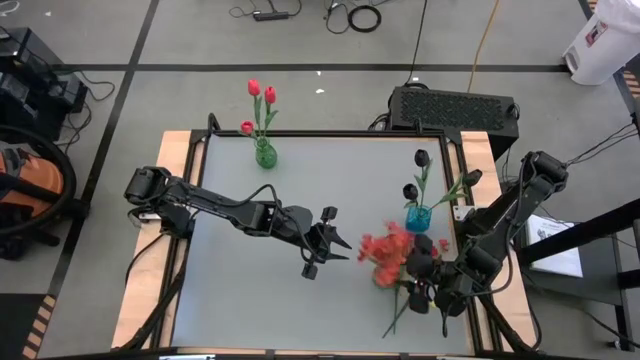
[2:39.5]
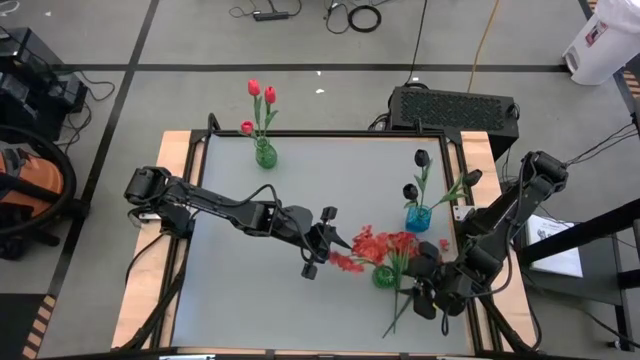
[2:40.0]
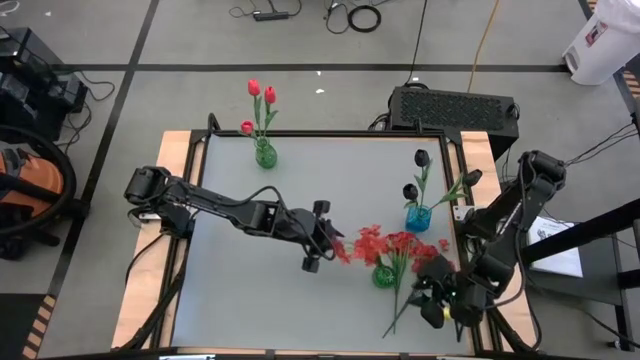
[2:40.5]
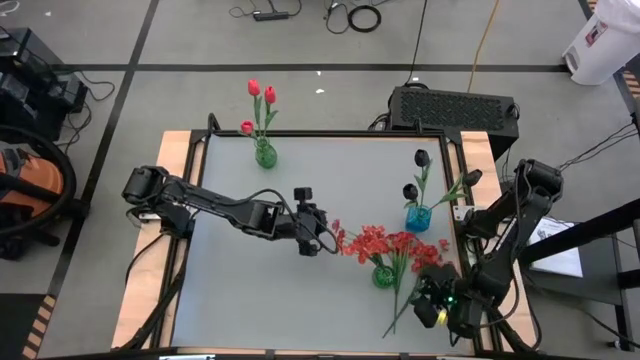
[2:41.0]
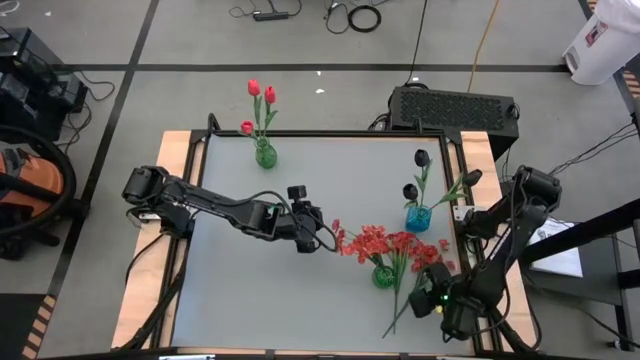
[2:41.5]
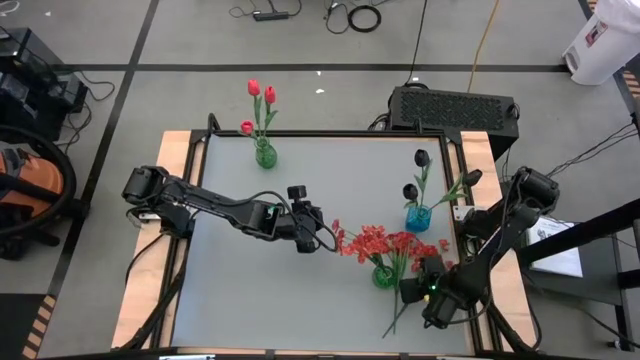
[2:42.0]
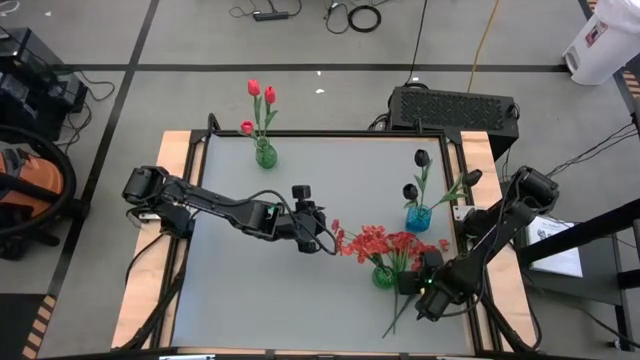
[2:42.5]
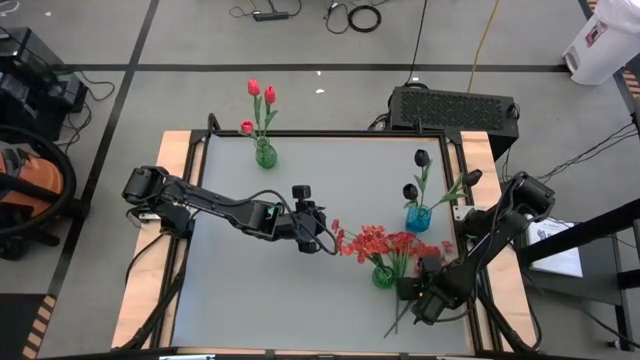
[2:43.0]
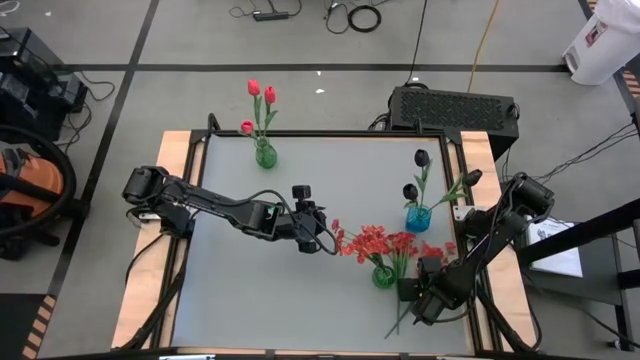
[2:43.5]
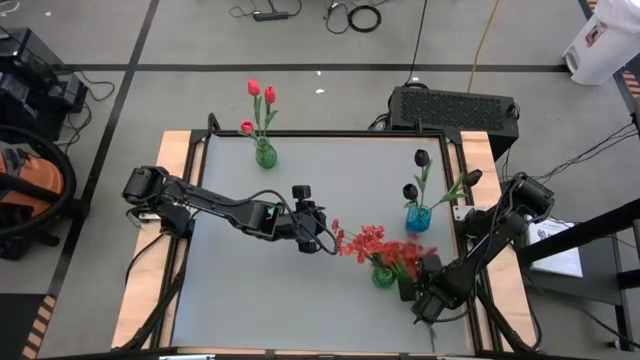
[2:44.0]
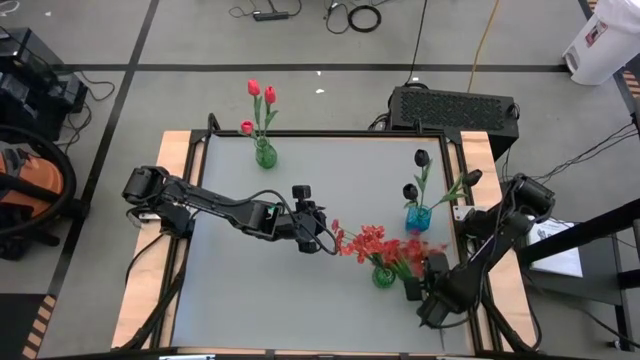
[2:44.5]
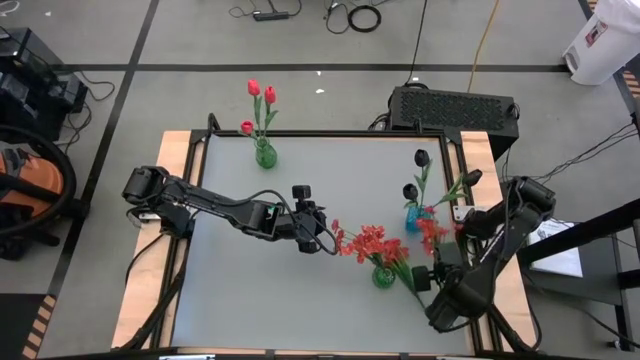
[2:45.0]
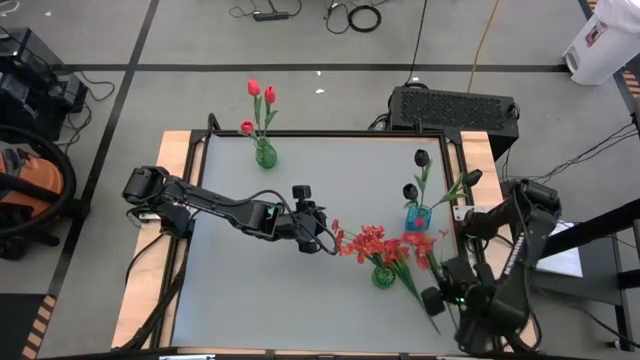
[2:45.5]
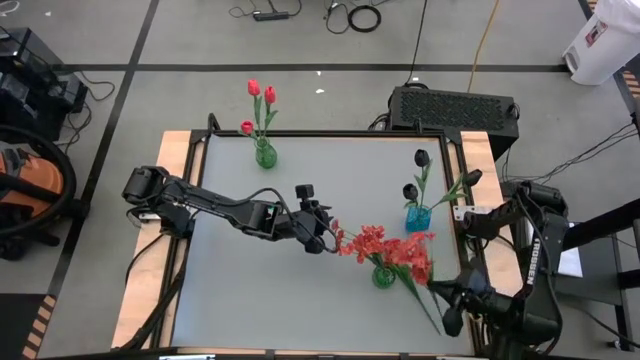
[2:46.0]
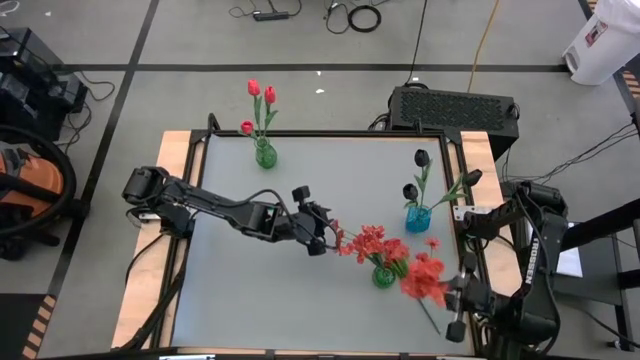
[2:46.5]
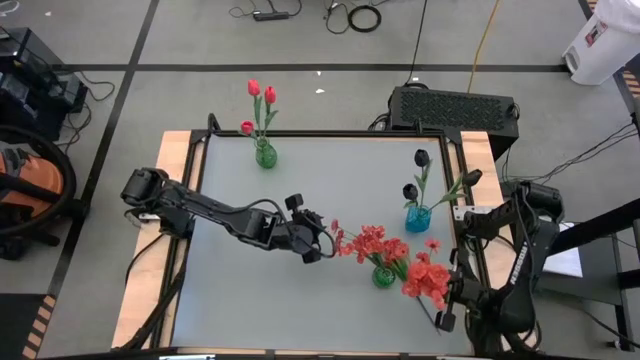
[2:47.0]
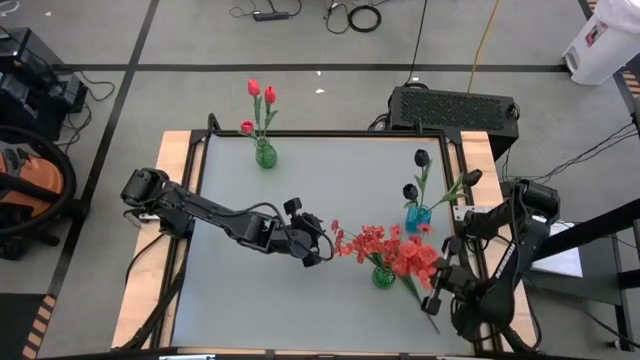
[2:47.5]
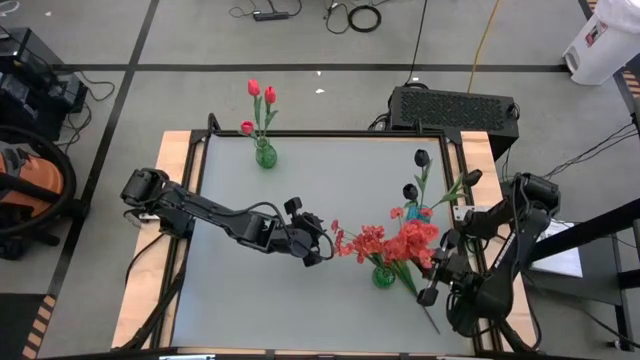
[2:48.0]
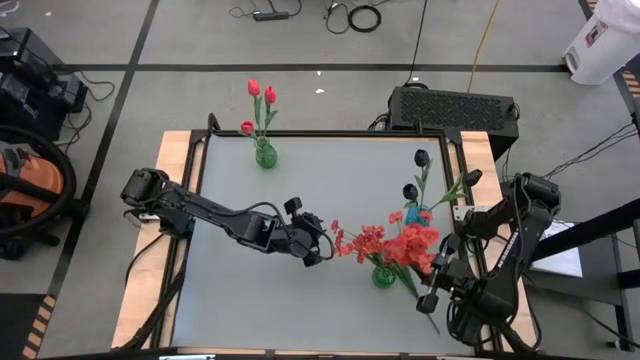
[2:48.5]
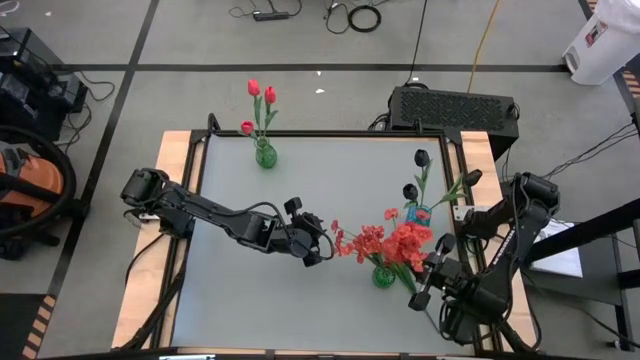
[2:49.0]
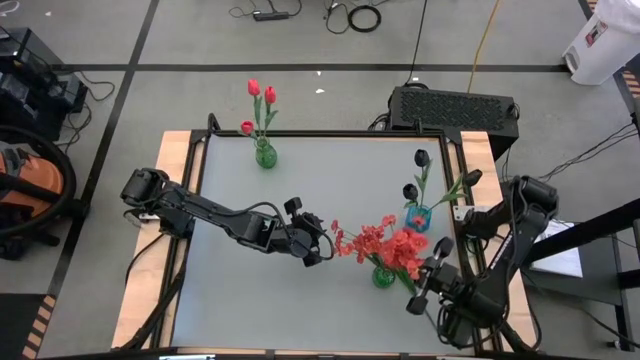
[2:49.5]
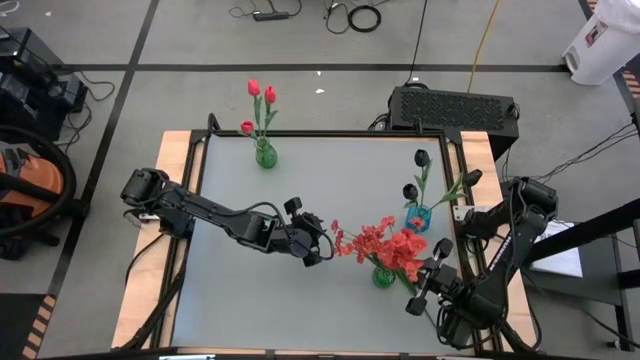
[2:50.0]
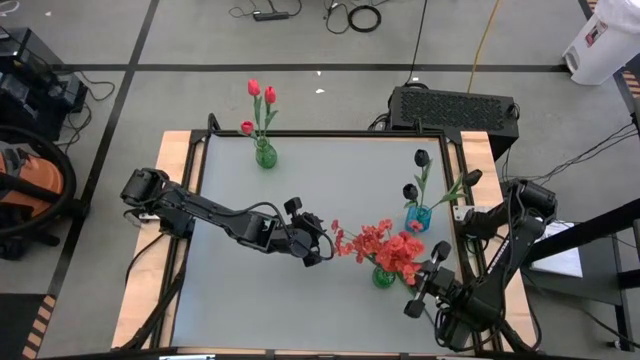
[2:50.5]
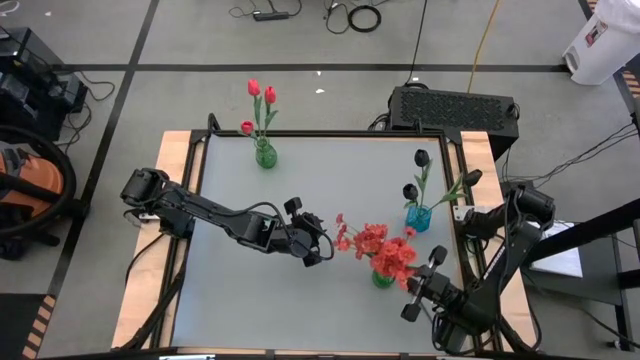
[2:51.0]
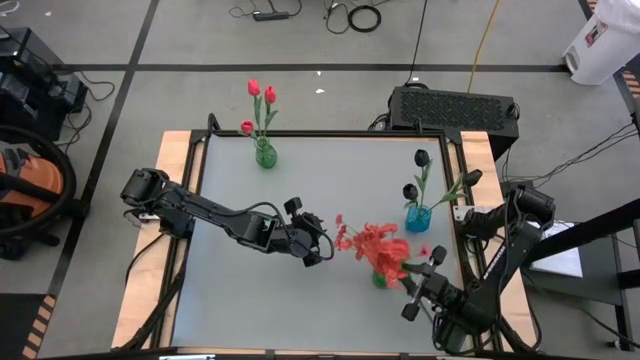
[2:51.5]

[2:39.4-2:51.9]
Task: Sort flowers into vase by color
Put the right red flowers into the bottom green vase

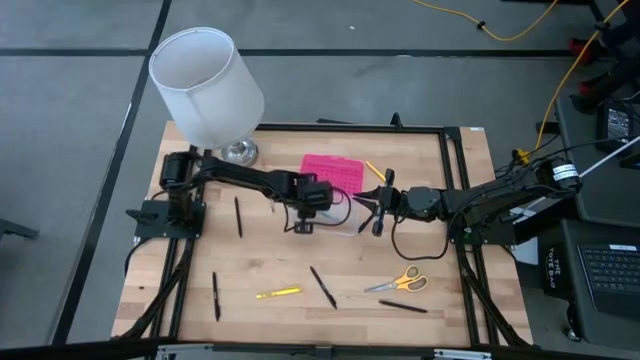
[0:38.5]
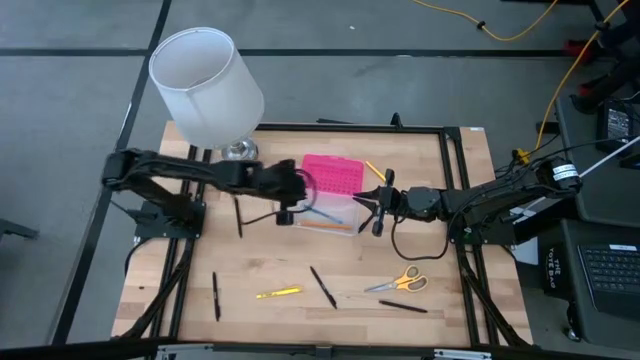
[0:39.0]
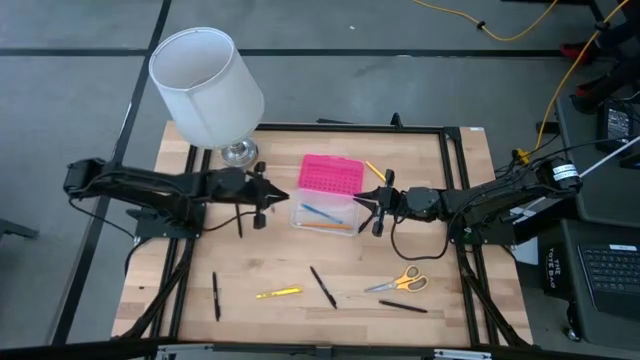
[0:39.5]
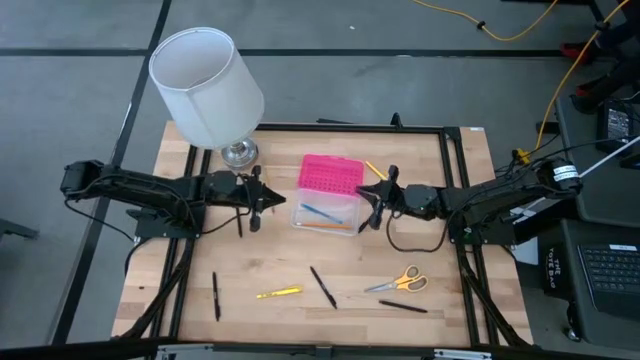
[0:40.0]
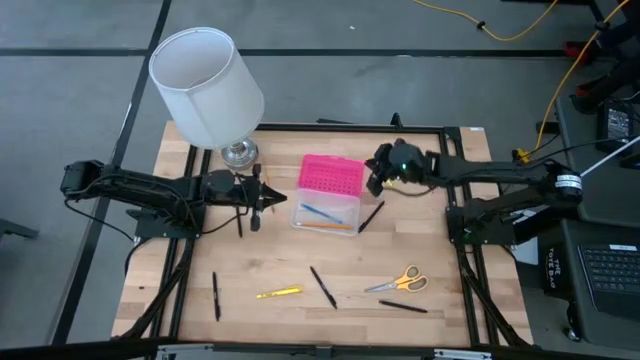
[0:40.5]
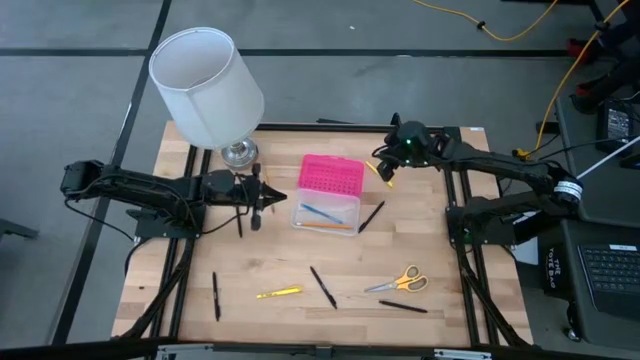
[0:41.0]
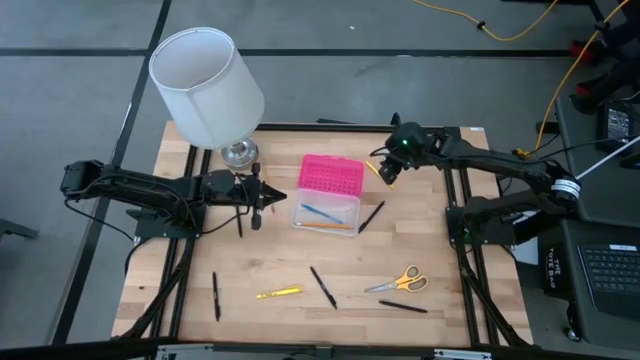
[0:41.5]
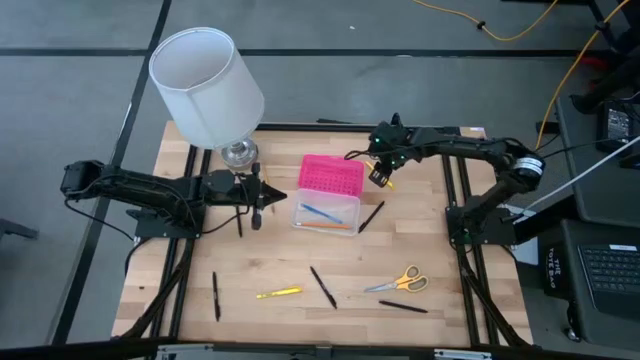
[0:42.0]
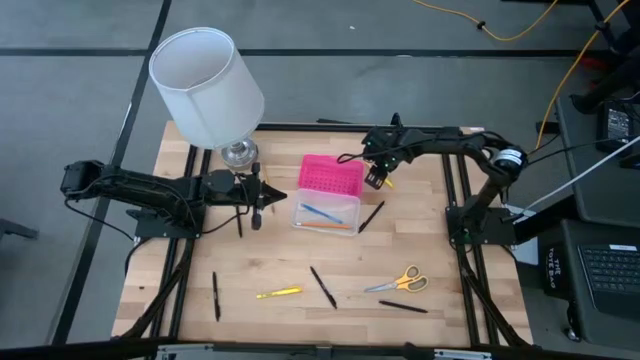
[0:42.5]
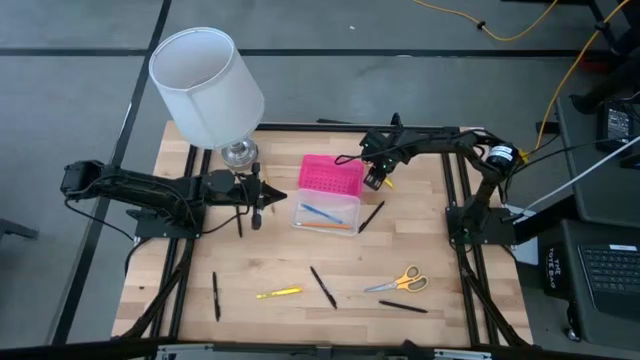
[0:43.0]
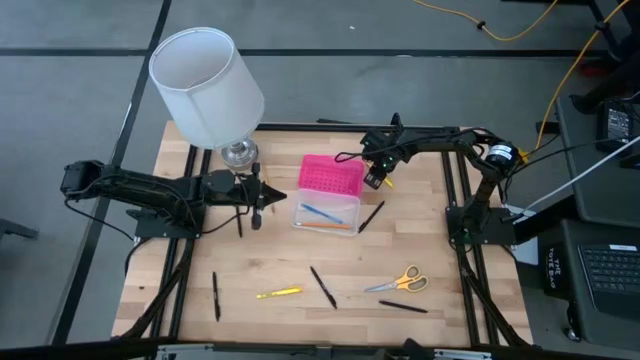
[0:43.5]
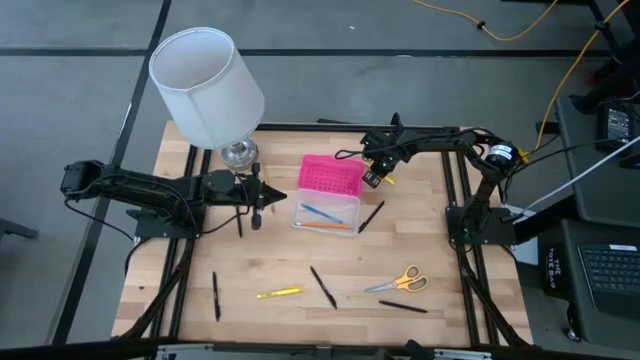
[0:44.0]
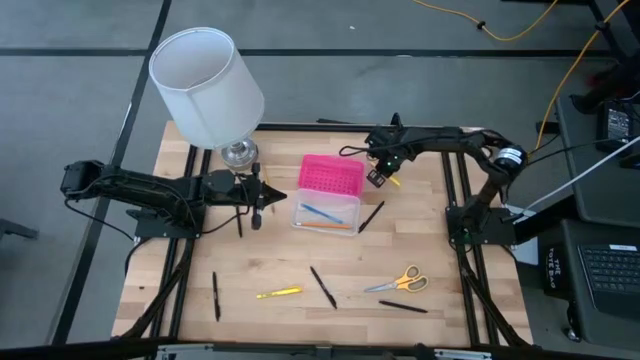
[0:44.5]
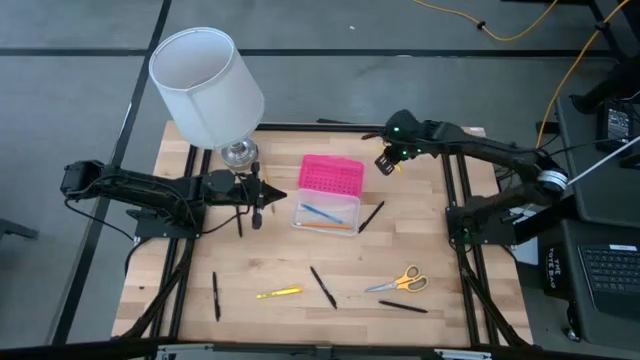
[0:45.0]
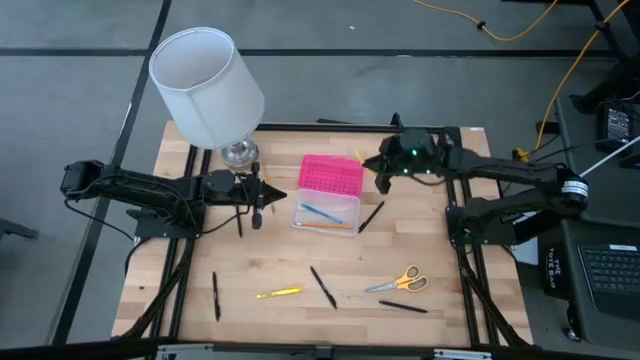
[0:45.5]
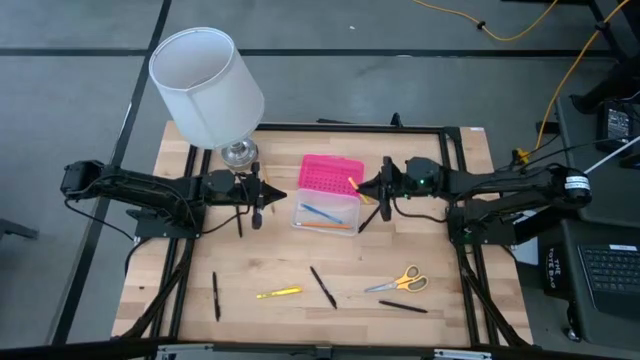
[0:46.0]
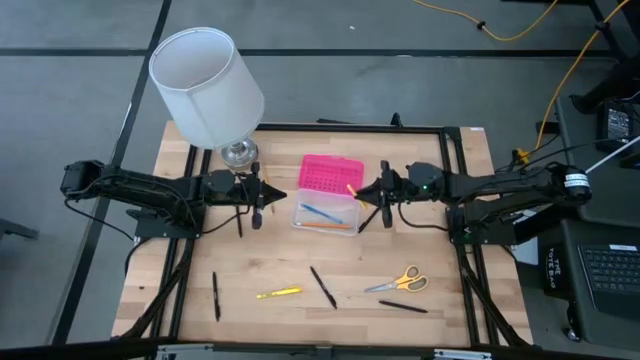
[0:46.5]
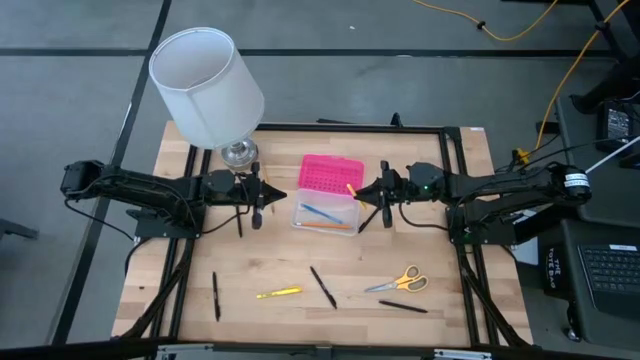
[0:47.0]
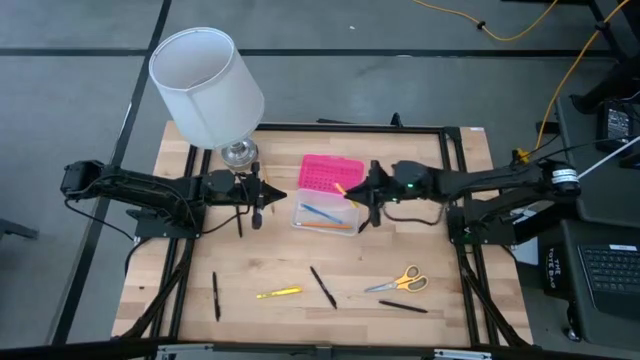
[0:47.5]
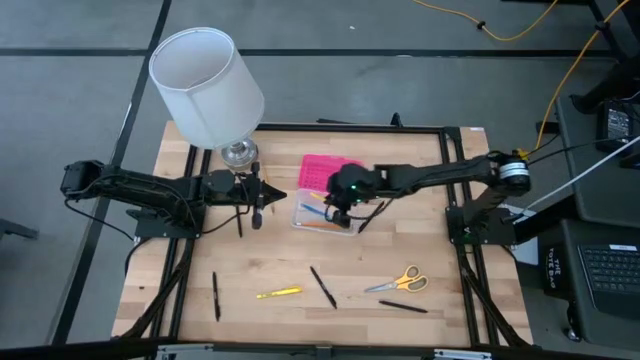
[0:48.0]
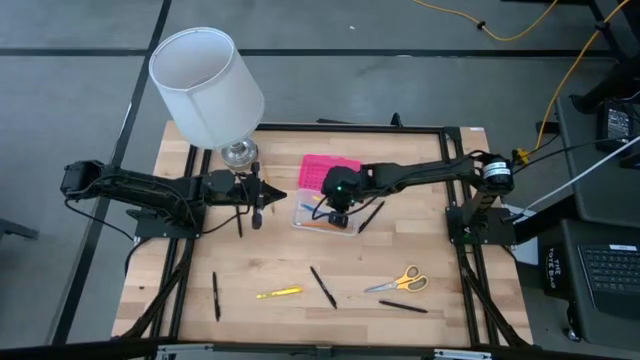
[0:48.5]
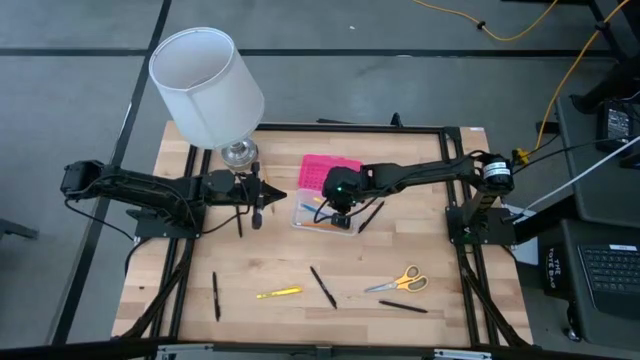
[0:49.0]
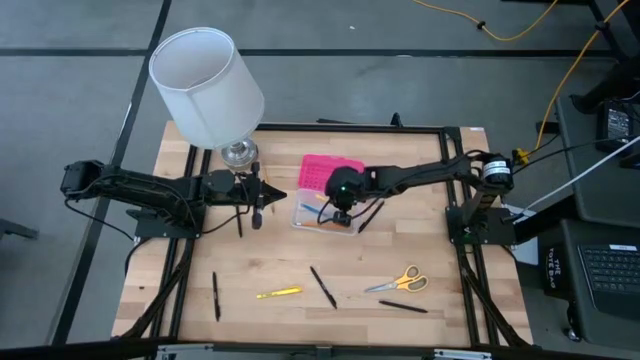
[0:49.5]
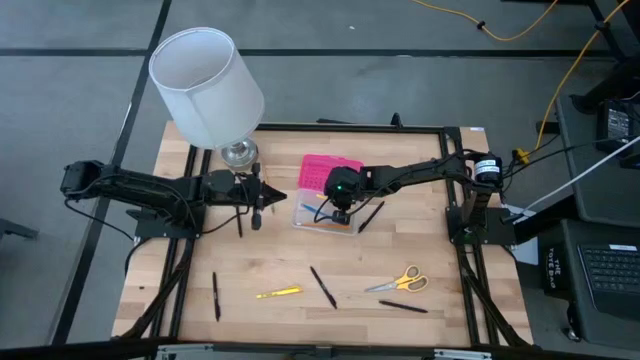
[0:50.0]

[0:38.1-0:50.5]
Task: Pick & place school supplies into a supply box
Put the yellow pen into the transparent supply box
